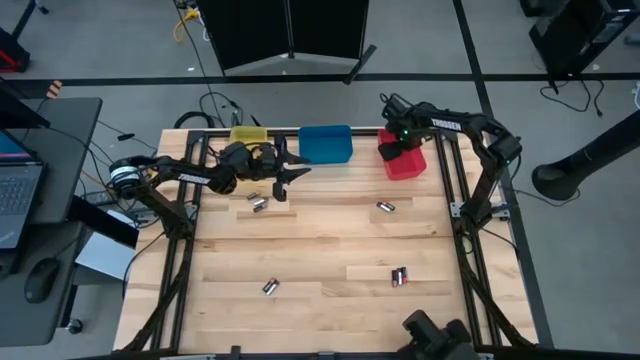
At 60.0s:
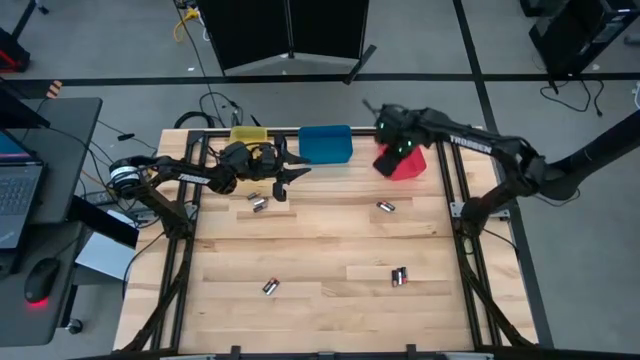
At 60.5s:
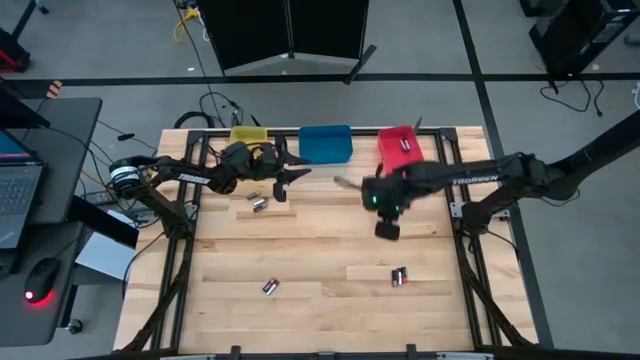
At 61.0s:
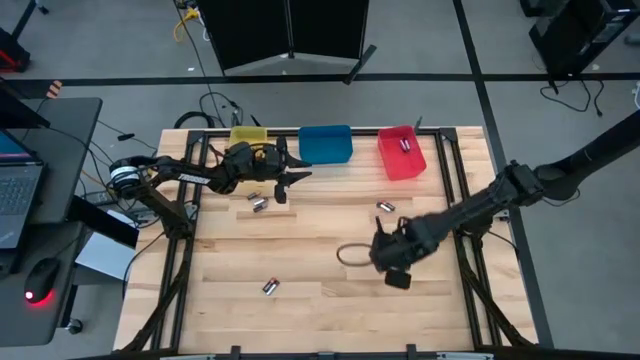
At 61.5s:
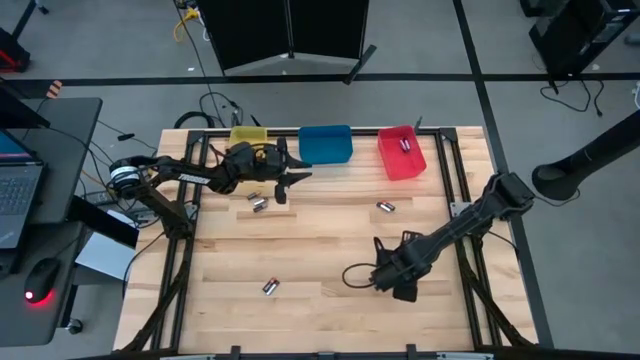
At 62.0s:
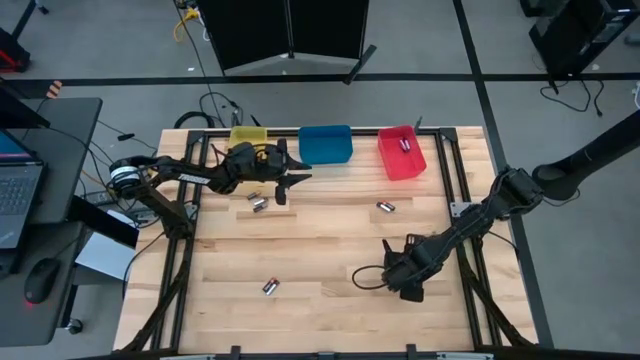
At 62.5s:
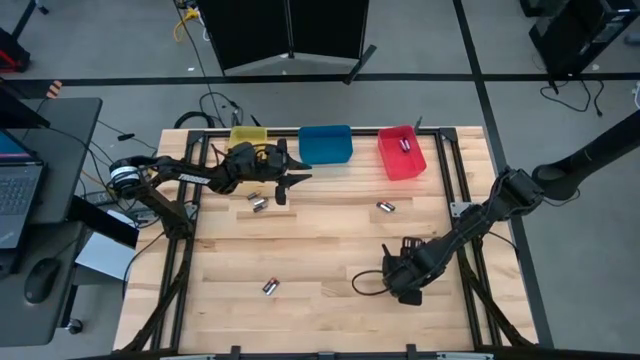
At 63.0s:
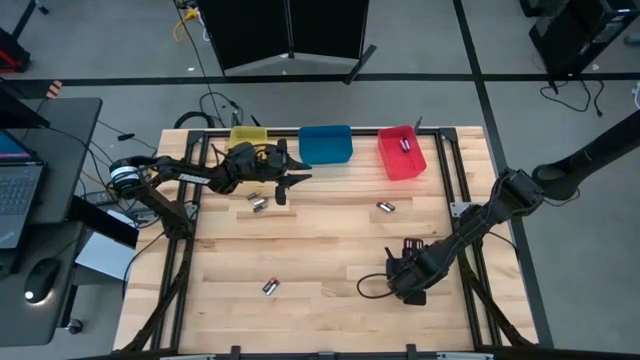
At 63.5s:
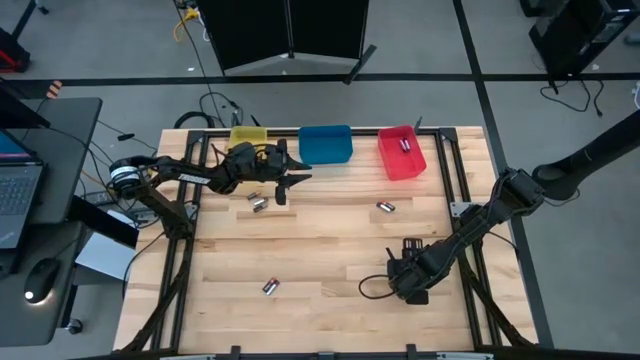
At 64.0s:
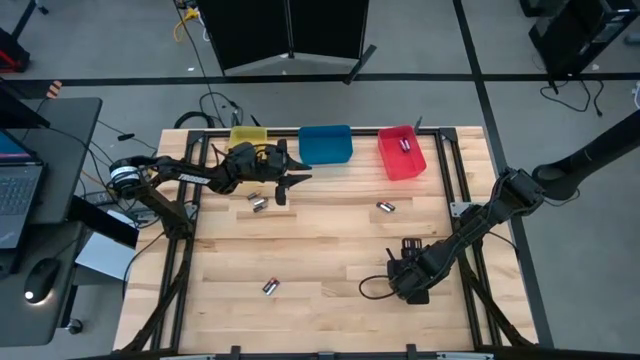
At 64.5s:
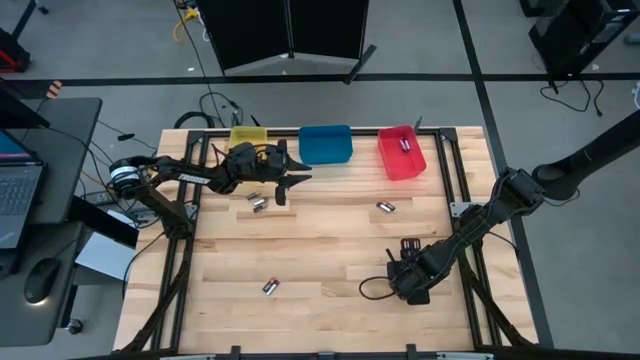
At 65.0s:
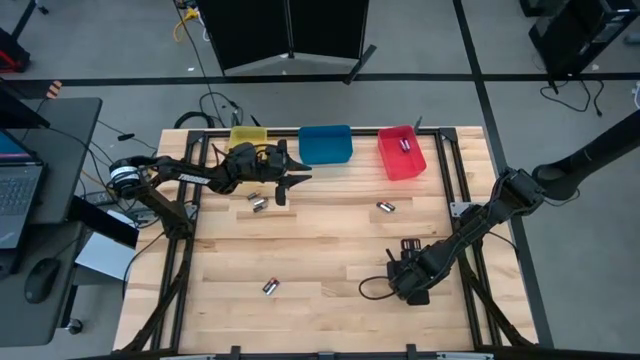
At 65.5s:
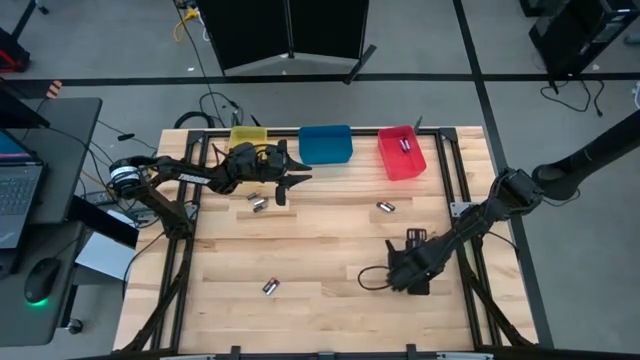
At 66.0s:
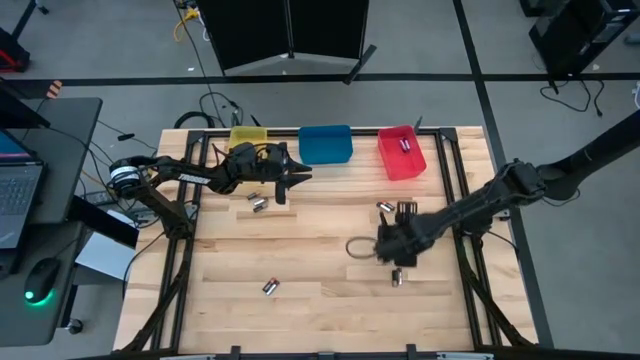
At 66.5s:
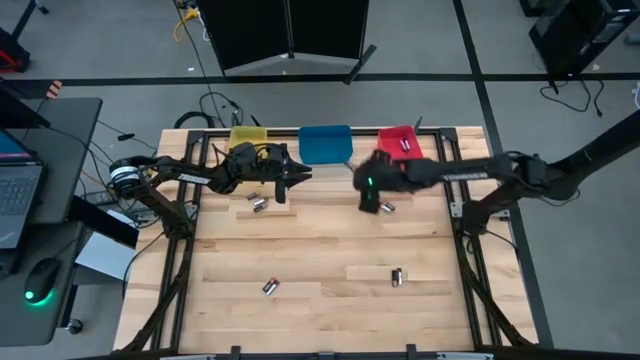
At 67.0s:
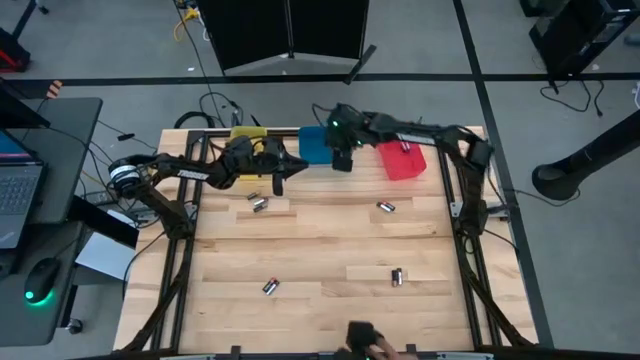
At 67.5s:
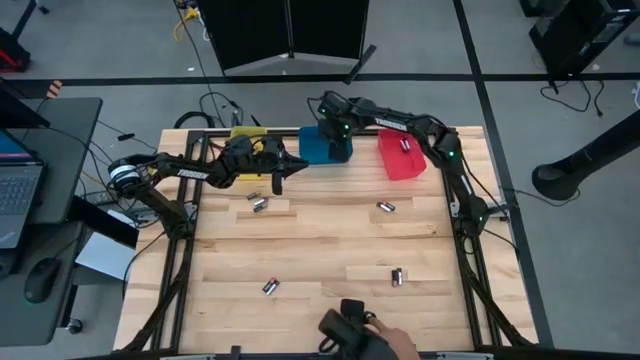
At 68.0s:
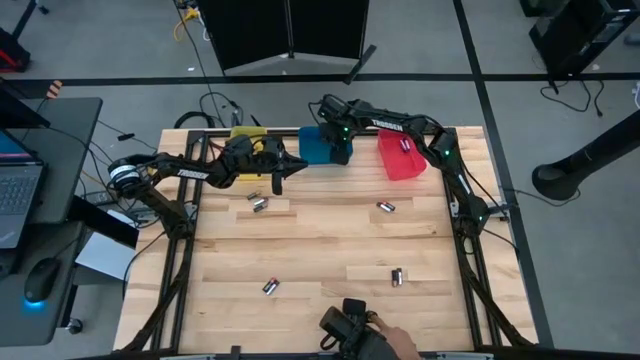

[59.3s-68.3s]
Task: Sort batteries
Put the black orange battery into the blue bin

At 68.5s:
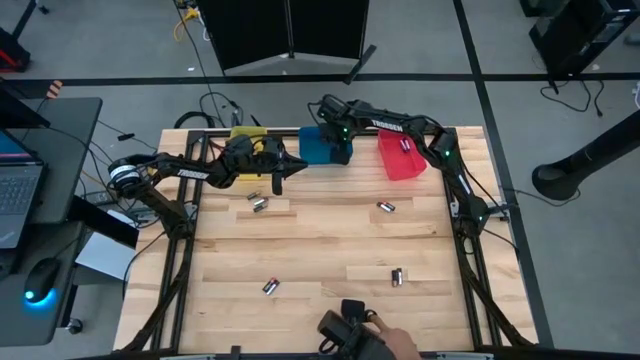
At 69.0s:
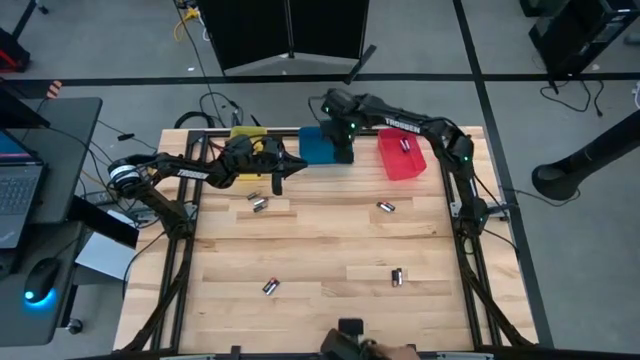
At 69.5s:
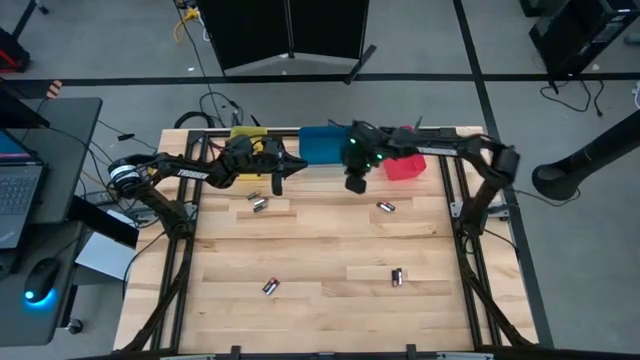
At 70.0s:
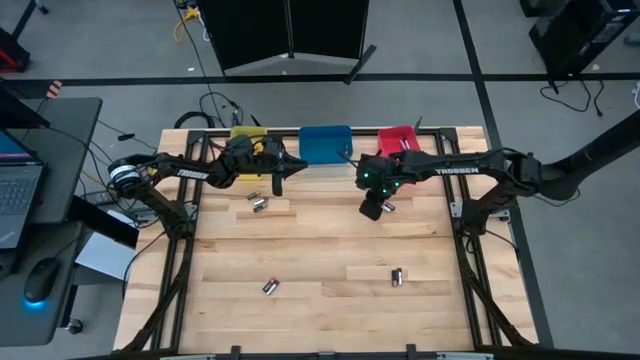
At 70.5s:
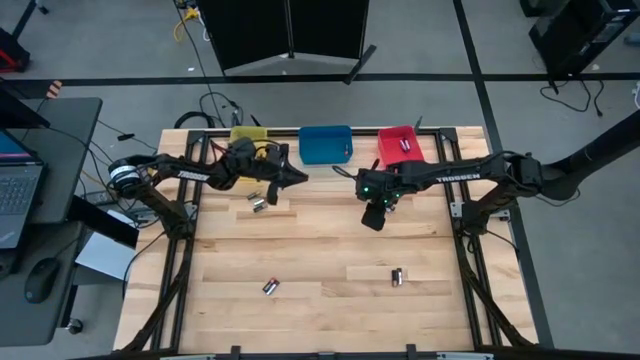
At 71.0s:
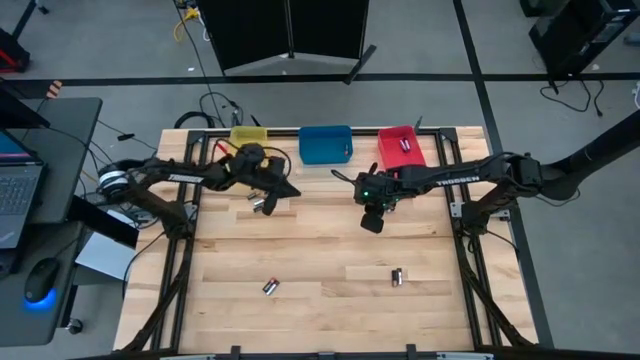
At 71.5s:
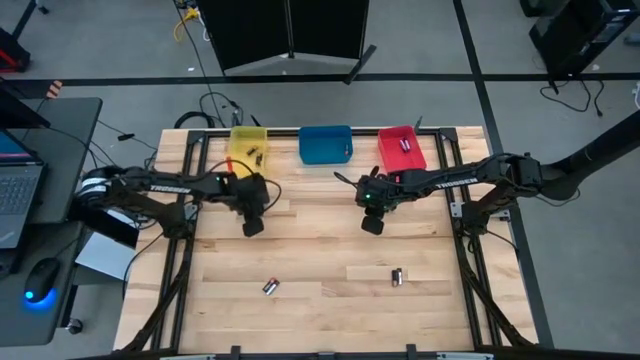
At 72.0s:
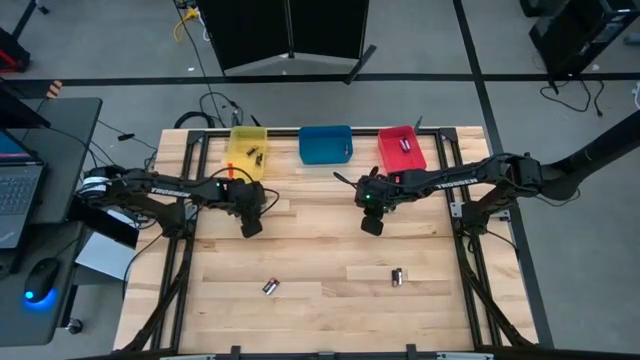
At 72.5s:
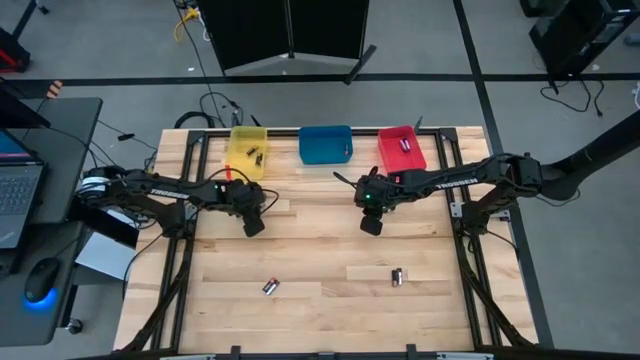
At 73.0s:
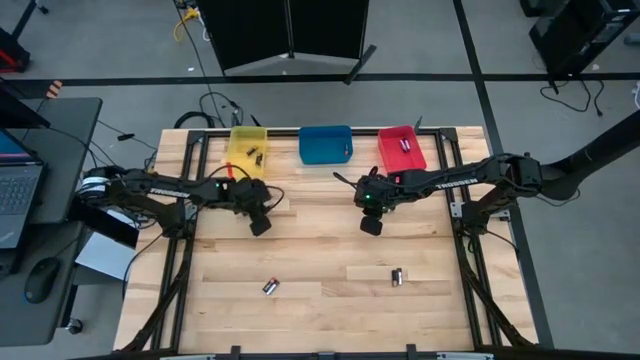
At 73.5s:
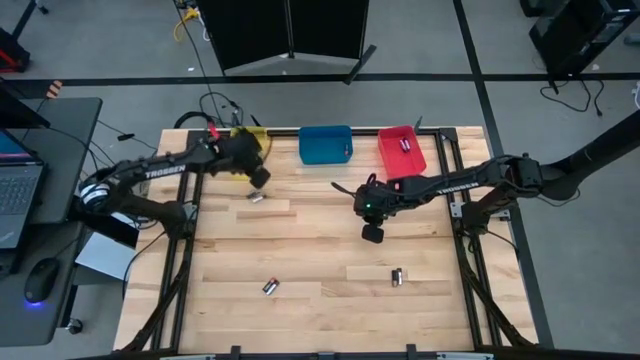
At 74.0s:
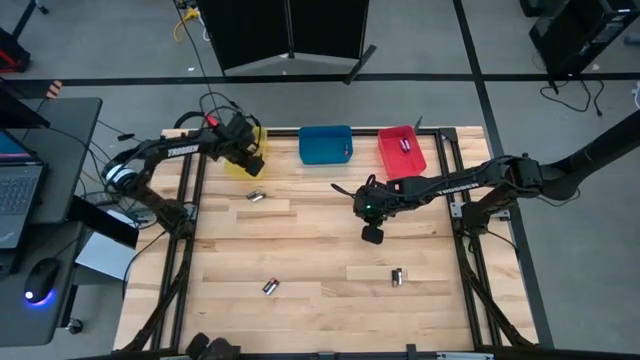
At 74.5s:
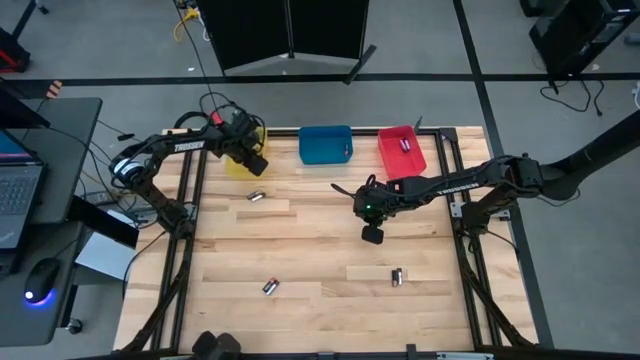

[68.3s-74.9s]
Put the black battery into the yellow bin

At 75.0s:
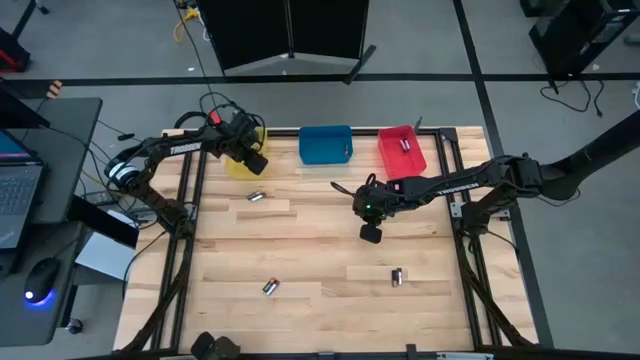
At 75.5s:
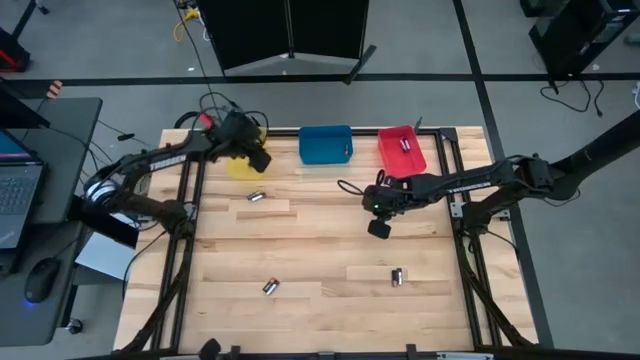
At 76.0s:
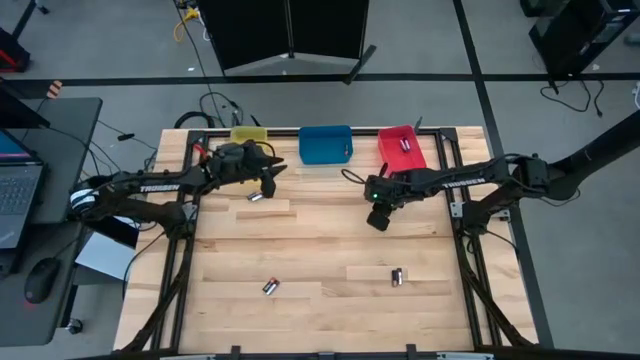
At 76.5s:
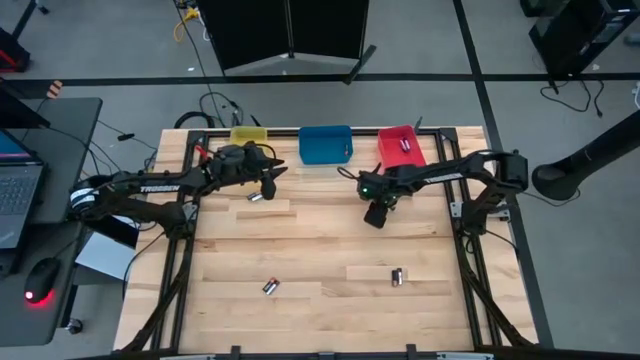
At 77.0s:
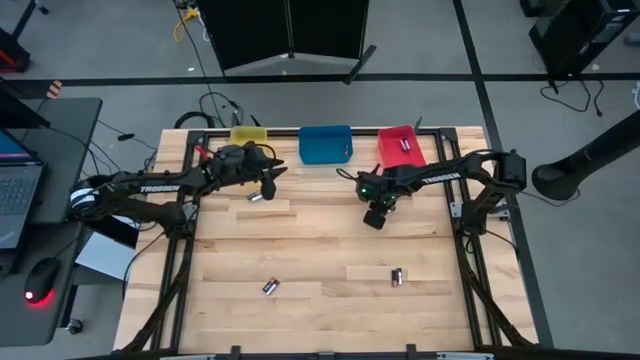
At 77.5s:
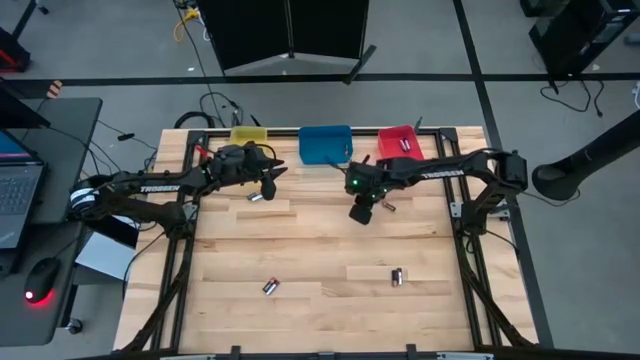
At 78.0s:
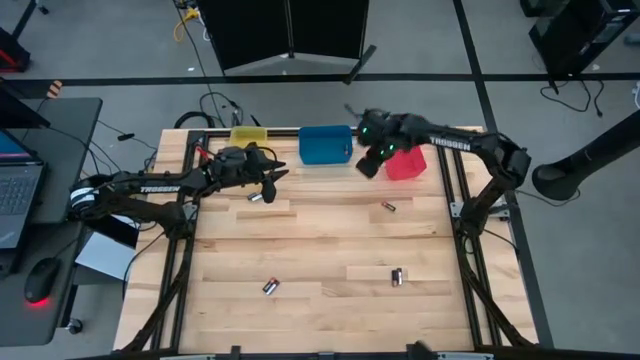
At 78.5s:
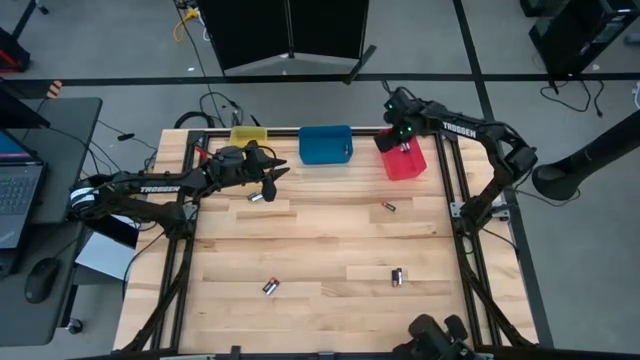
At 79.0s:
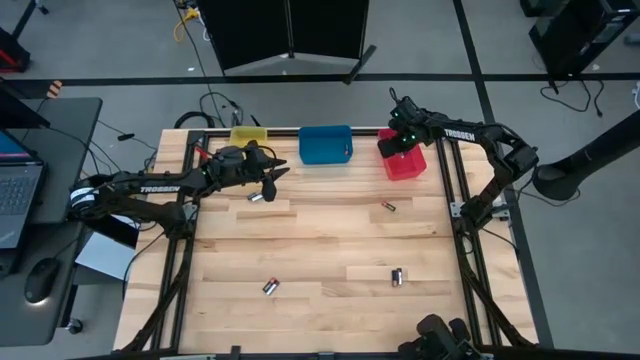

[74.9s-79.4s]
Put the silver battery into the pink bin

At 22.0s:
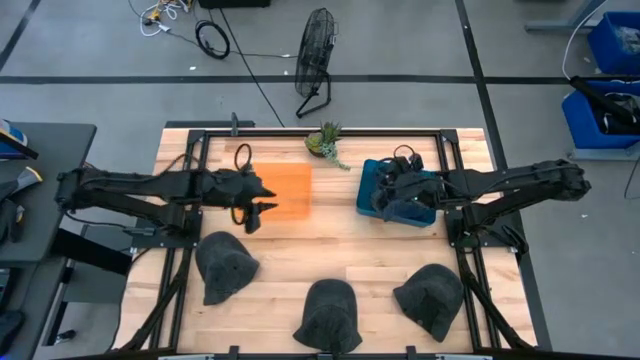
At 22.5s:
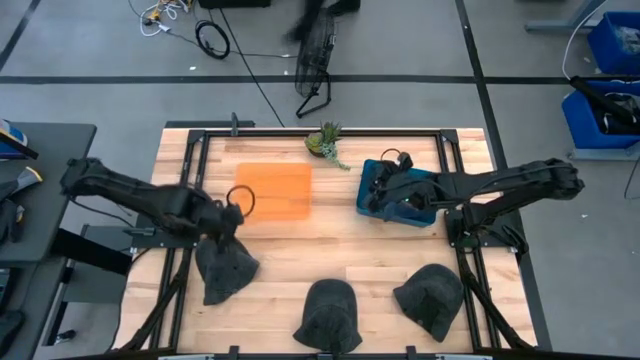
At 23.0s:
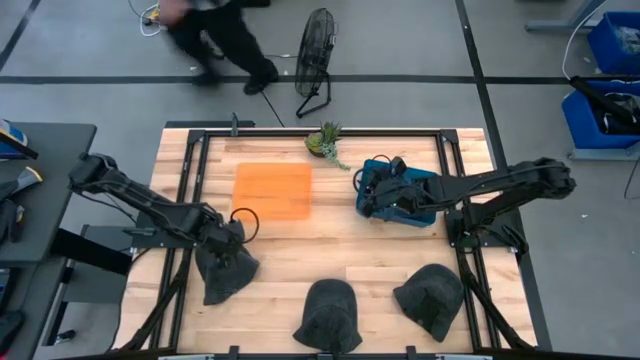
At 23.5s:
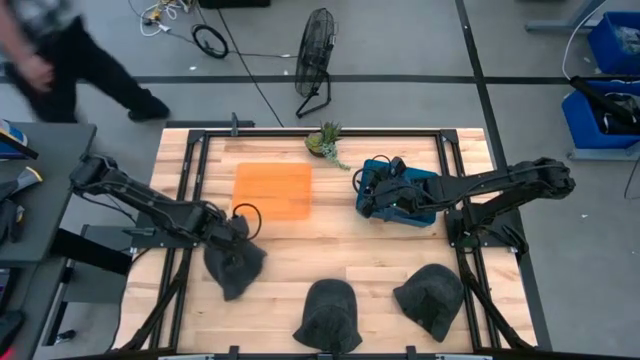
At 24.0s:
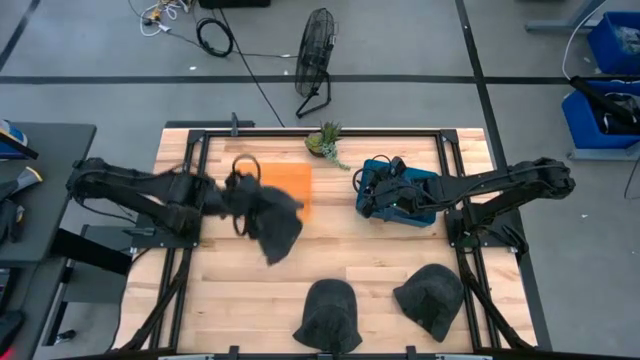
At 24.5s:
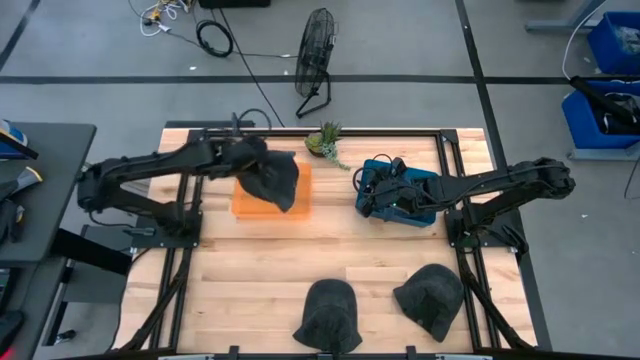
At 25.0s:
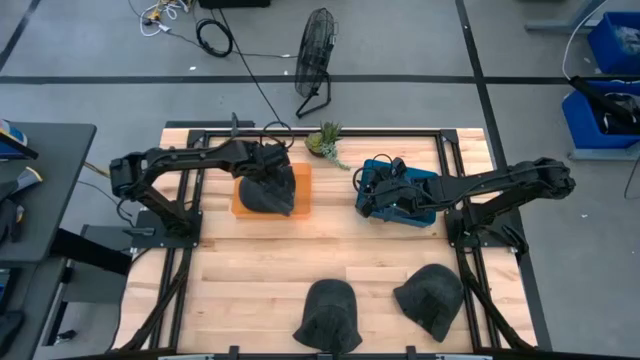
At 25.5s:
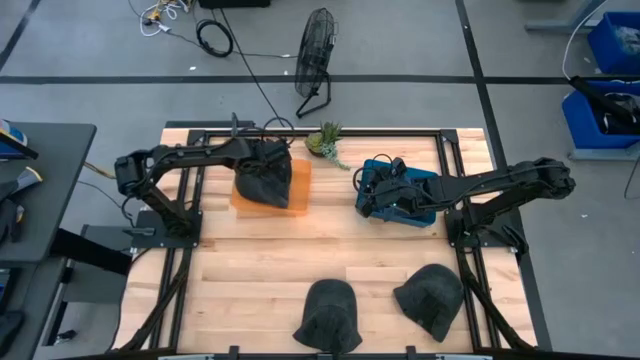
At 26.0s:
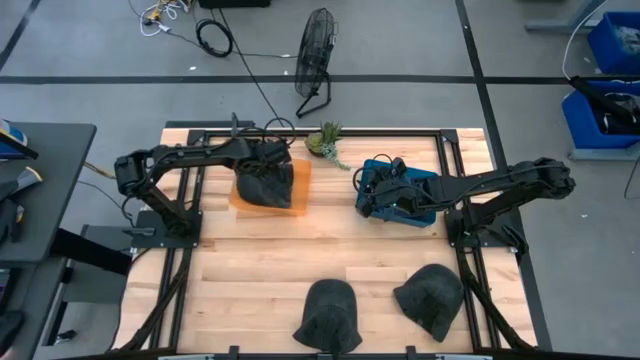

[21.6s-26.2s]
Task: Pick & Place hat
Put the top black cap into the orange bin
